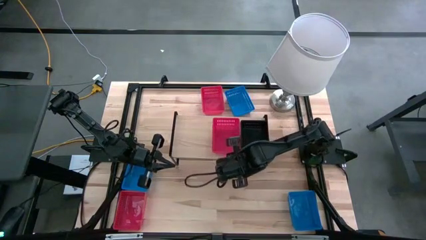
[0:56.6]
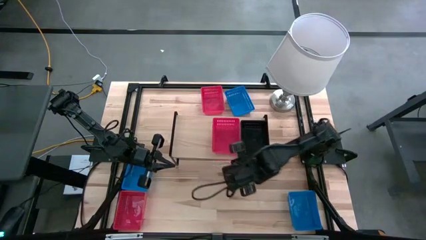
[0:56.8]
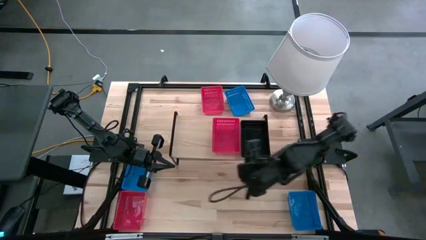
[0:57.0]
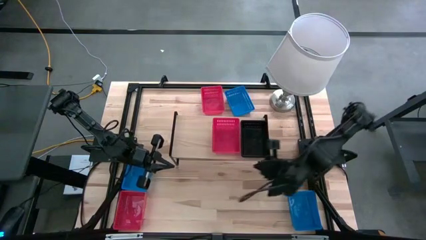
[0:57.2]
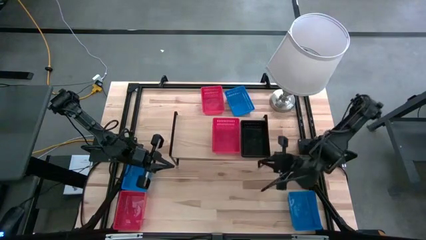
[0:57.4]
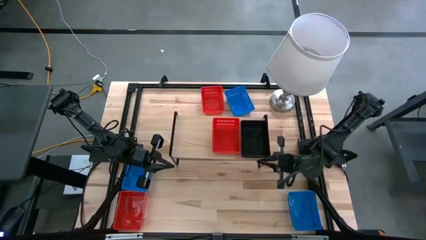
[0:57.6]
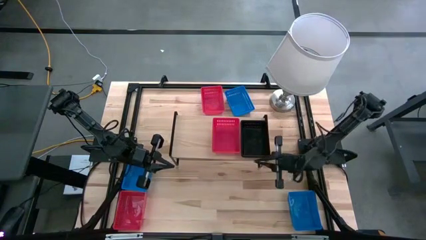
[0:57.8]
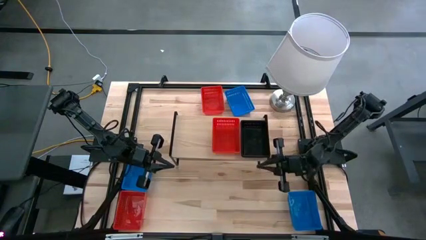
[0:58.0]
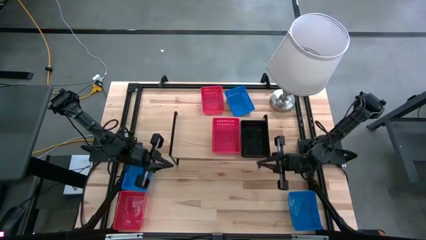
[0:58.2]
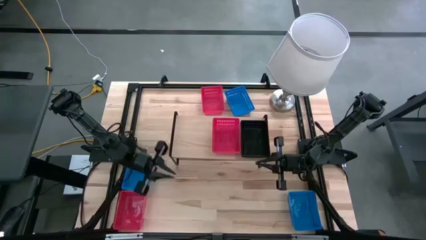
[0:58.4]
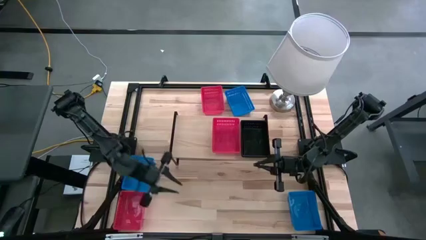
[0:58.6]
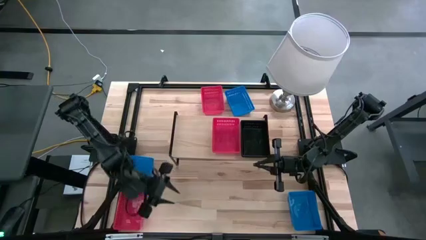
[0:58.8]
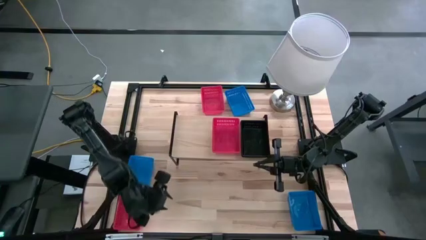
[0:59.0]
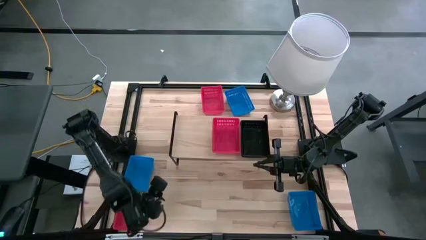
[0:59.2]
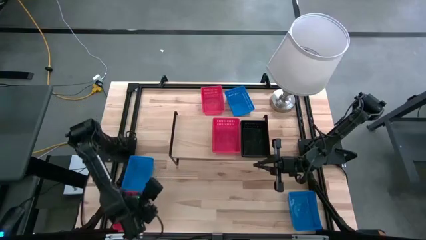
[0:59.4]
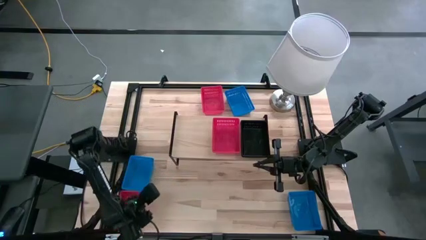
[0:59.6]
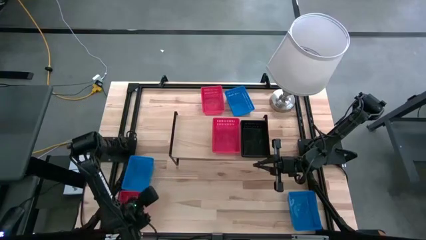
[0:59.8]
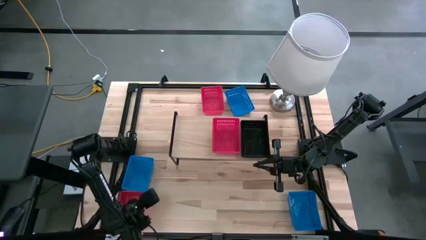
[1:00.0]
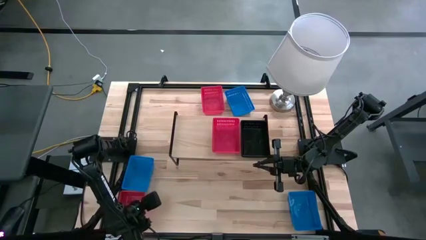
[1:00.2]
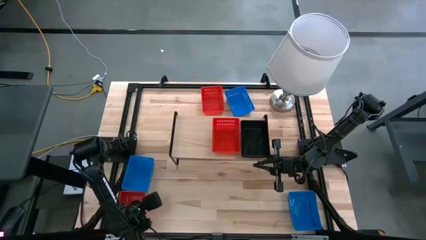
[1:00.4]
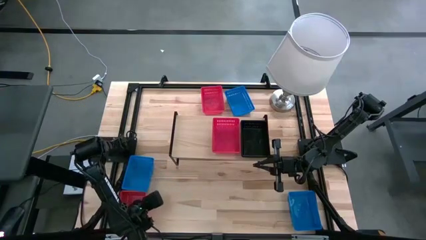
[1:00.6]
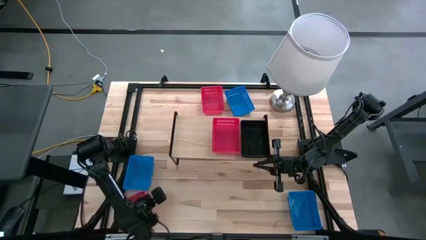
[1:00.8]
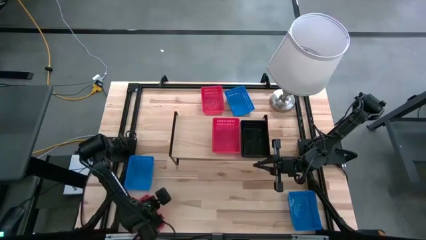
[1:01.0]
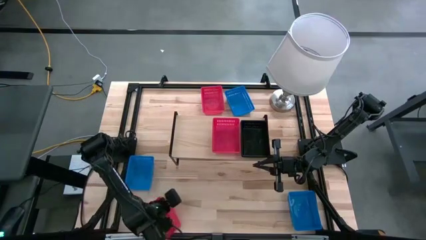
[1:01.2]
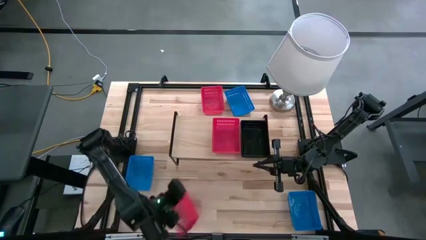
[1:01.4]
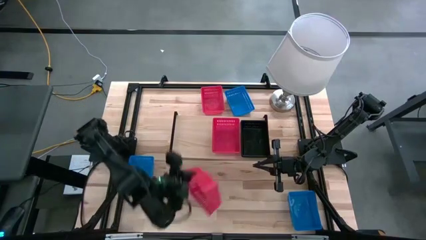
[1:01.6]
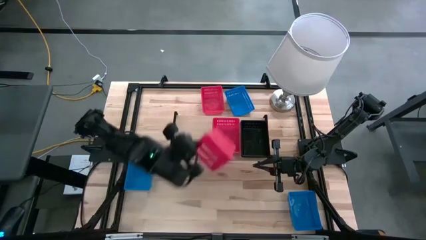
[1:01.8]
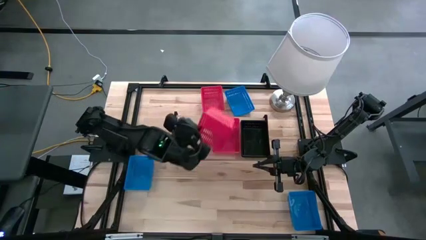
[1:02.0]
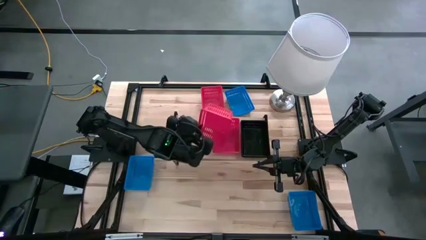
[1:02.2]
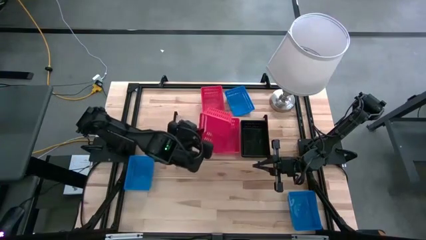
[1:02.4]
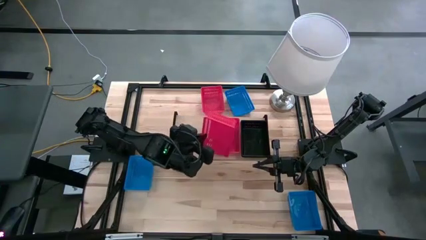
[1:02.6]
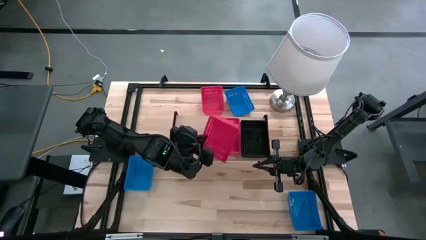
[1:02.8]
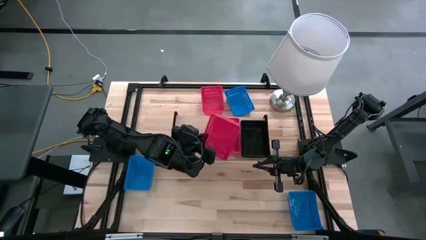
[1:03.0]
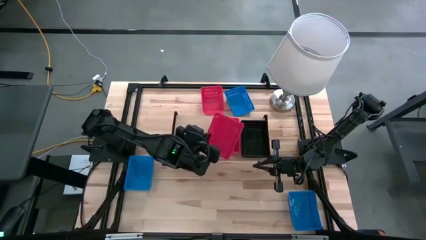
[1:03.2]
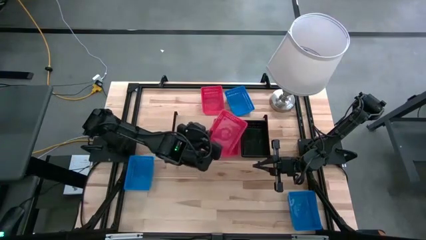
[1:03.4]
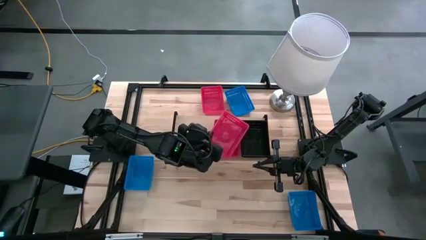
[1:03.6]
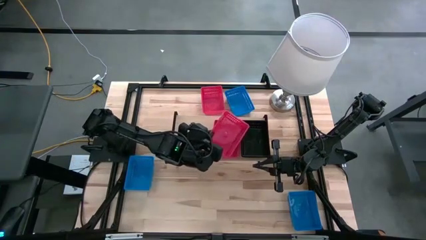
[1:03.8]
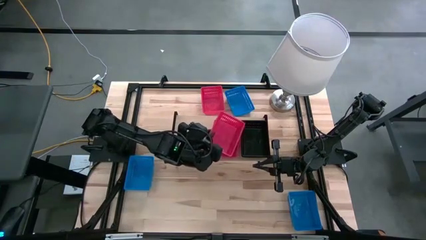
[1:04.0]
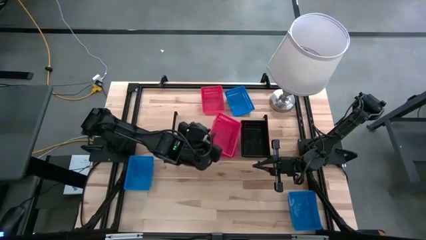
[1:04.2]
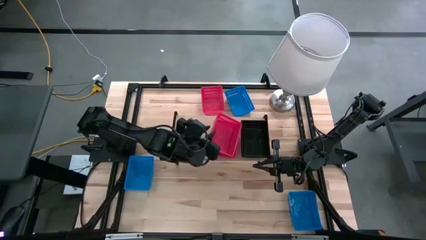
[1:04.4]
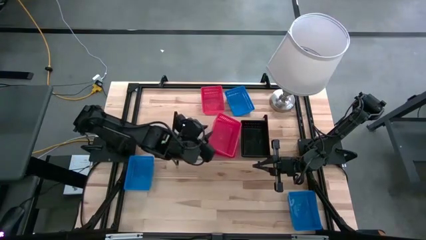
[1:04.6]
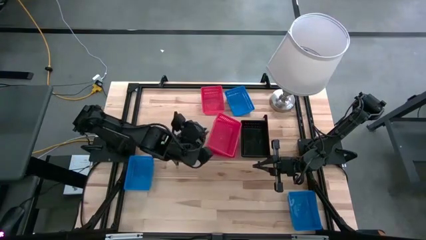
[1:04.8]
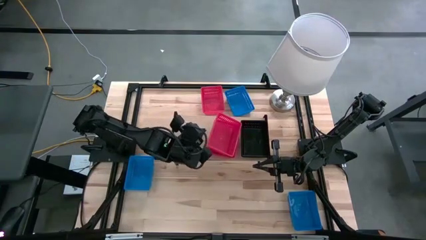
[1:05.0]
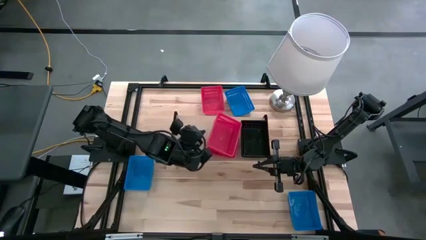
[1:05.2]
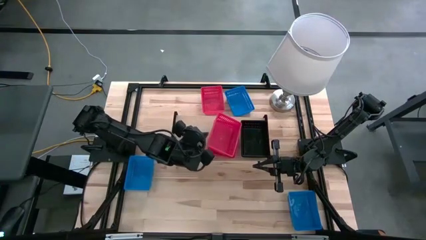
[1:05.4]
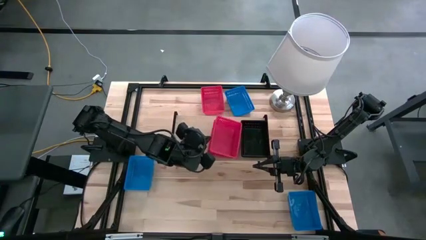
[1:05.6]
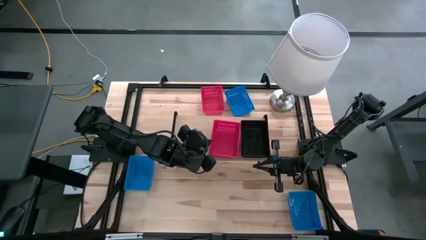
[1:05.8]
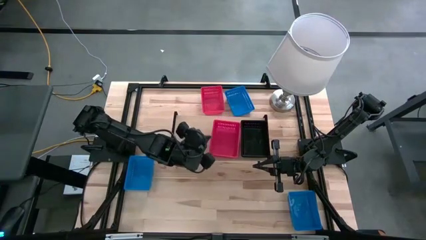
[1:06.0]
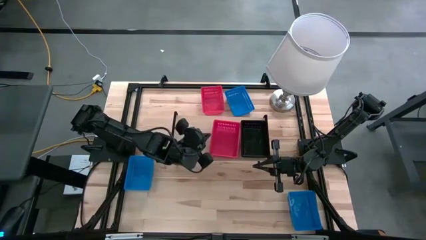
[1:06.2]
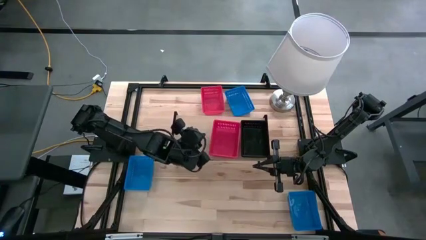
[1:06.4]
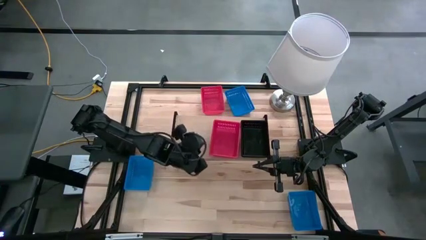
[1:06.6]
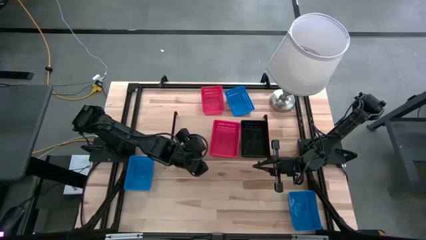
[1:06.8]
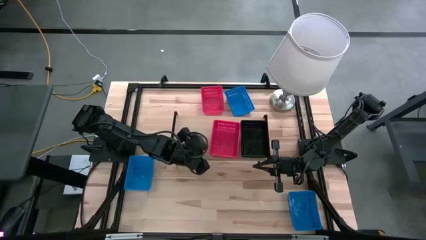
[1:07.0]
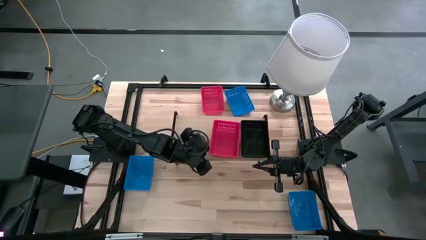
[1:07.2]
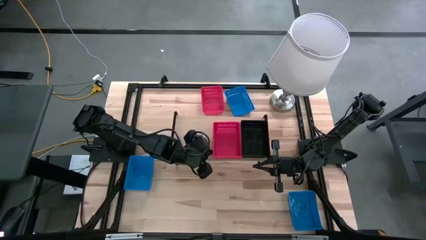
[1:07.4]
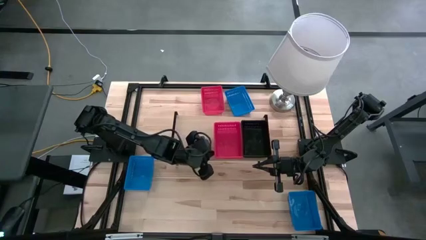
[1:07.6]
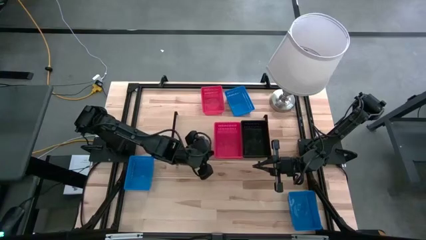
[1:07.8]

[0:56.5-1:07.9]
Task: Stack baskets on shelf by color
Stack the bottom red bin on the red bin on the shelf

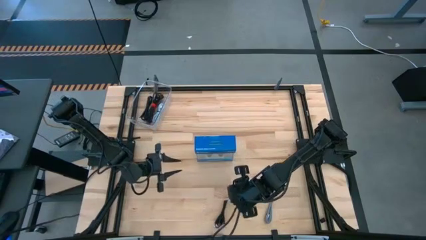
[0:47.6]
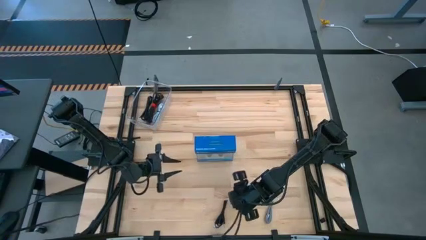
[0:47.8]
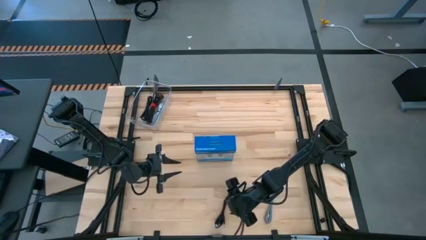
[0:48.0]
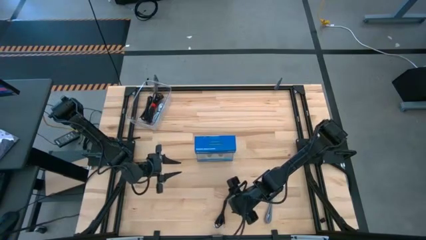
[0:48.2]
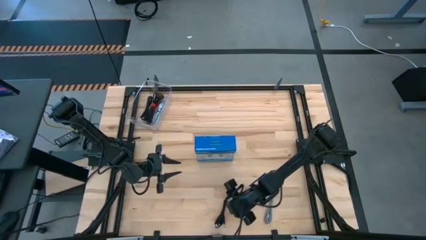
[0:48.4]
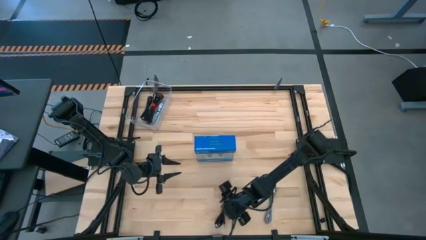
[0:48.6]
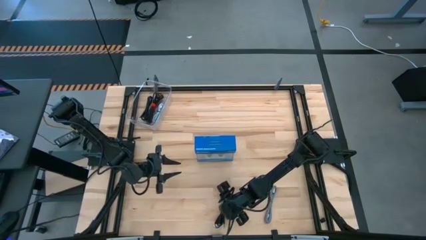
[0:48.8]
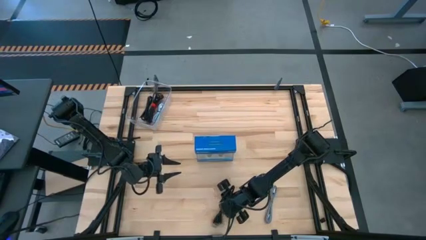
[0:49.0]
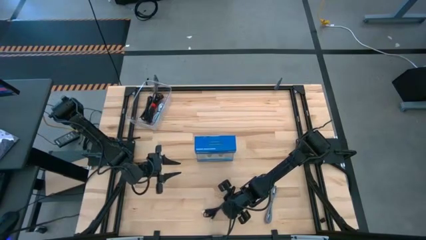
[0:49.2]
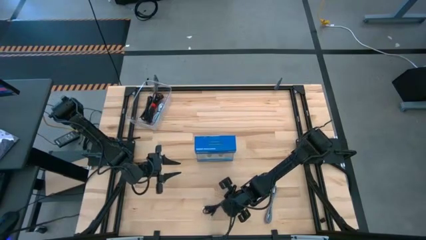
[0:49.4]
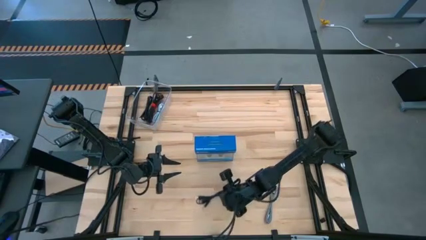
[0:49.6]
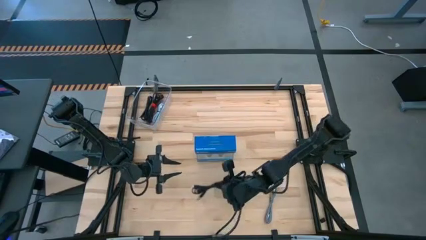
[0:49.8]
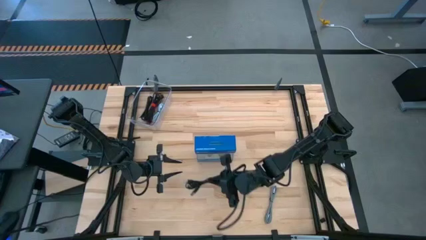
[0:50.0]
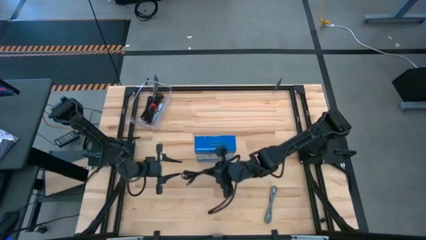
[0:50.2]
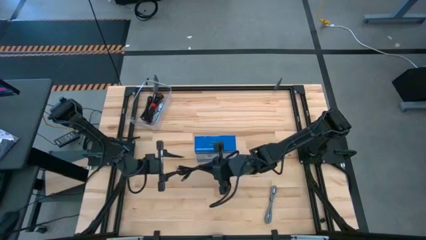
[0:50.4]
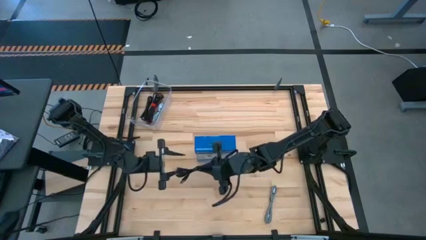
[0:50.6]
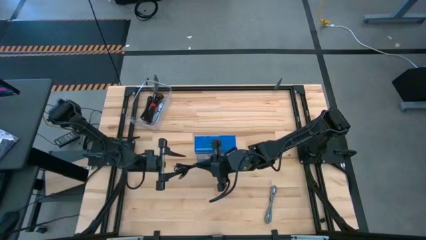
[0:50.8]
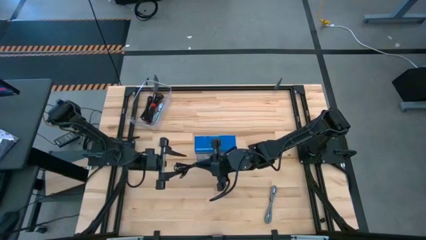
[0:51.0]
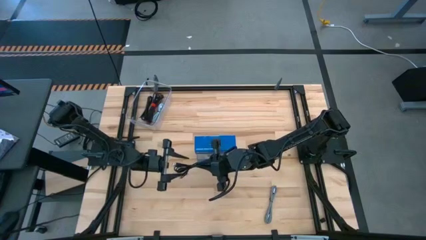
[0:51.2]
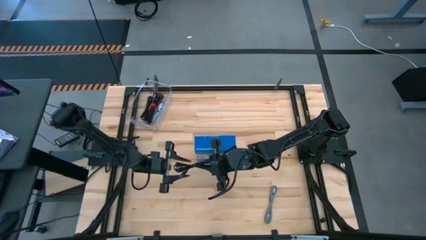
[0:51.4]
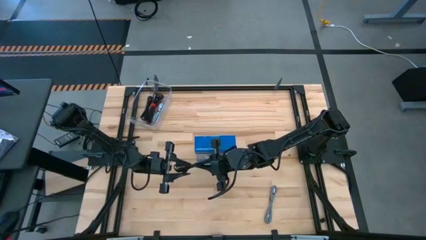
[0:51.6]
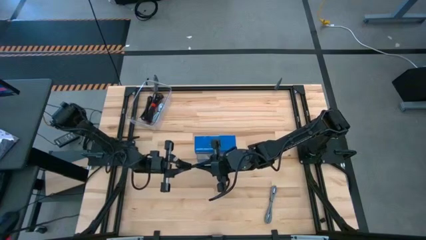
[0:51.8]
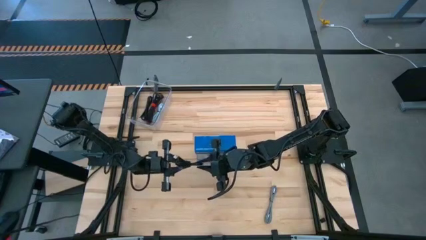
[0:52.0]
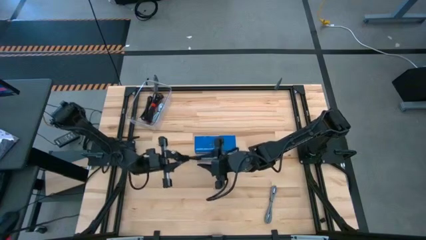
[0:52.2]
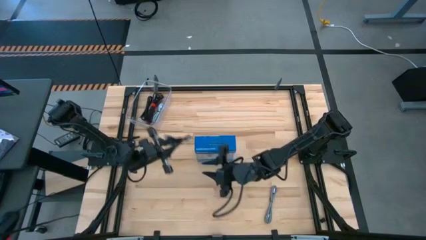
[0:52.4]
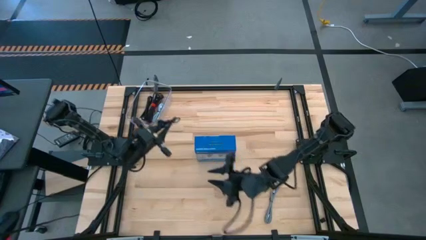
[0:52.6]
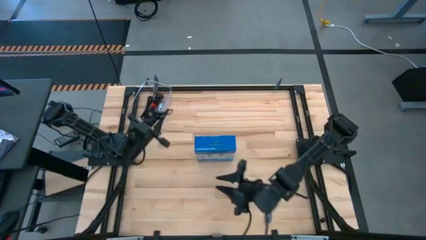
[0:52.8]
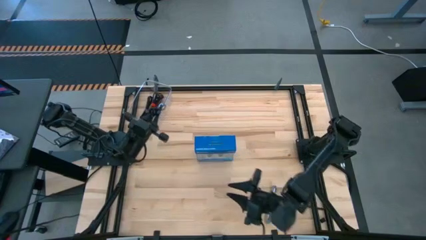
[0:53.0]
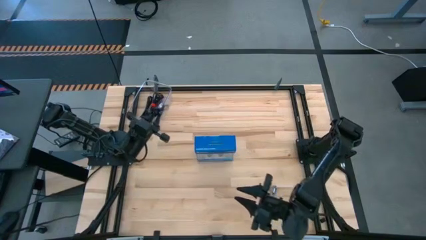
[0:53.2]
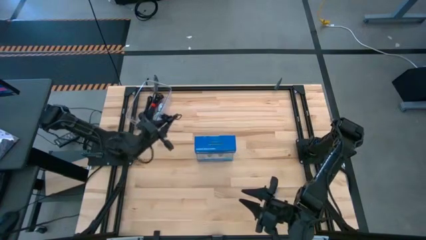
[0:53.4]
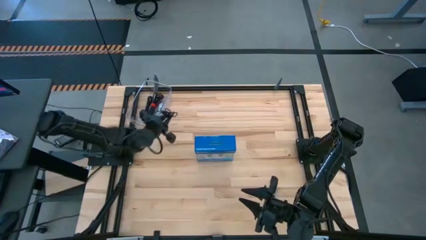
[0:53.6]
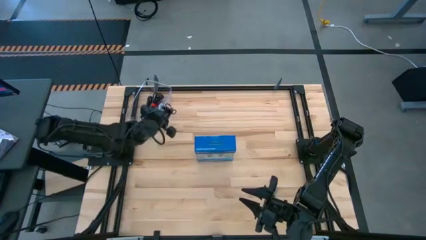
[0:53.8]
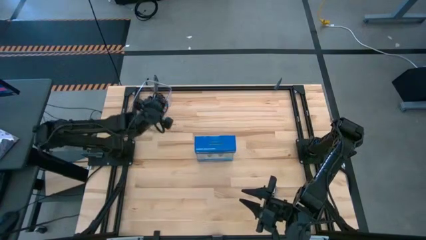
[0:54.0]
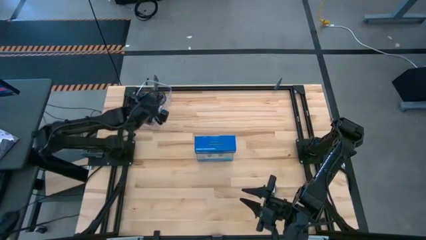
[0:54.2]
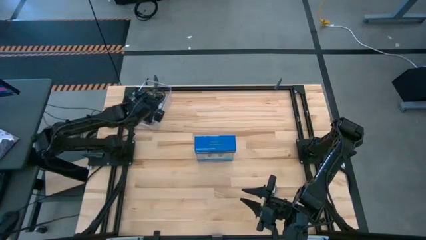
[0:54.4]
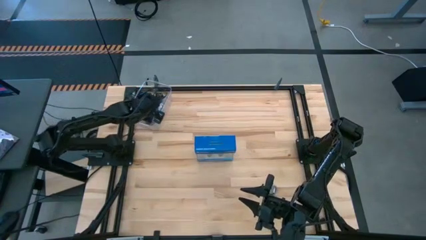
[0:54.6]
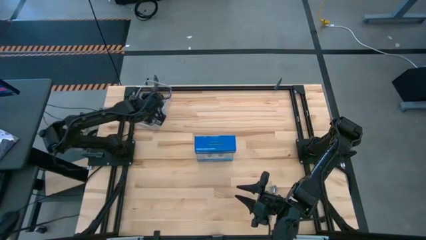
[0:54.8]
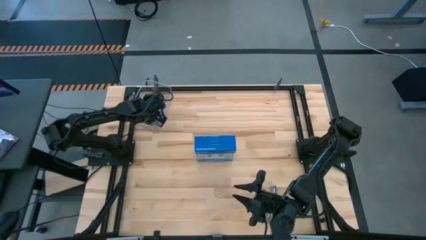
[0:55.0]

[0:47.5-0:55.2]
Task: Pick and place USB-C Cables
Put the black charger cable into the transparent bin
